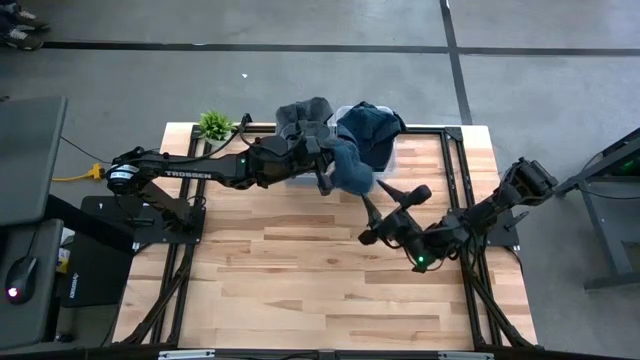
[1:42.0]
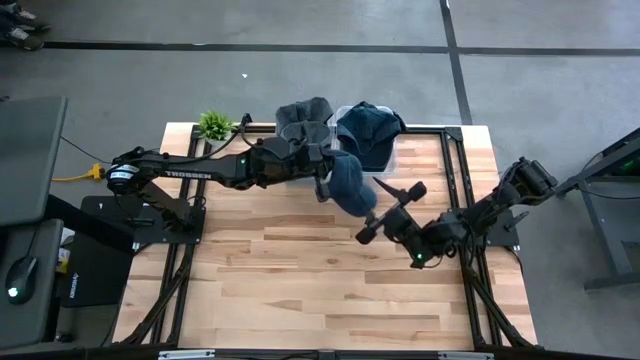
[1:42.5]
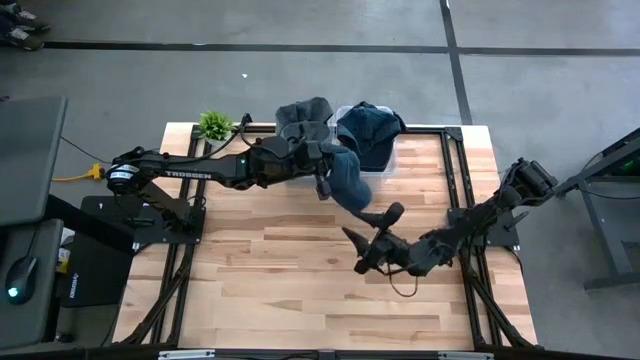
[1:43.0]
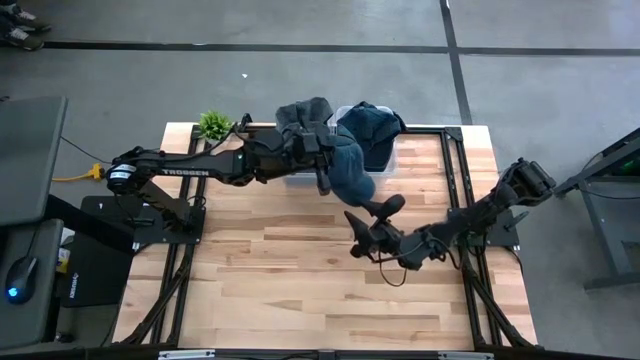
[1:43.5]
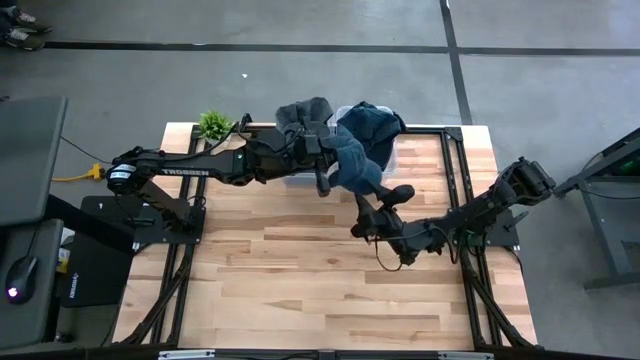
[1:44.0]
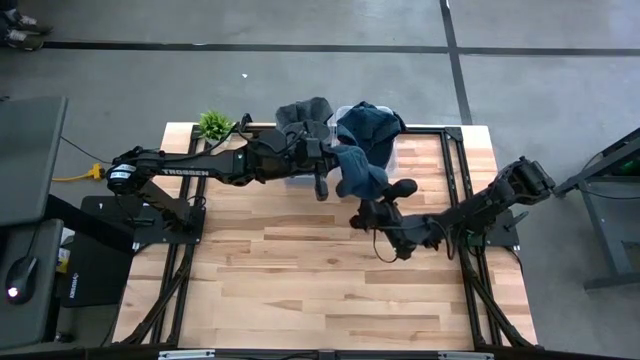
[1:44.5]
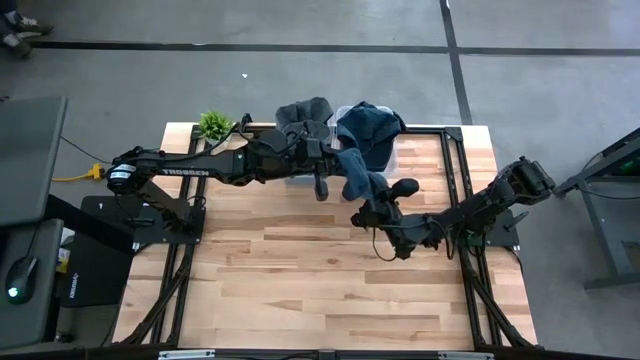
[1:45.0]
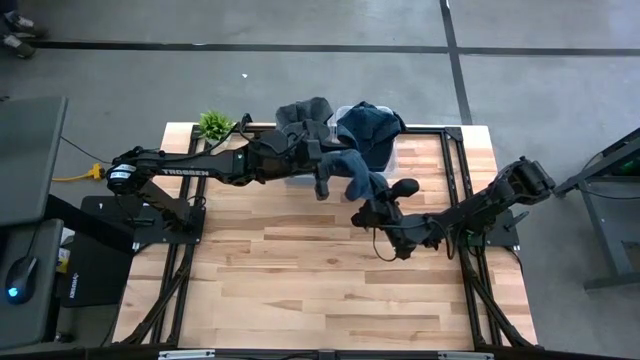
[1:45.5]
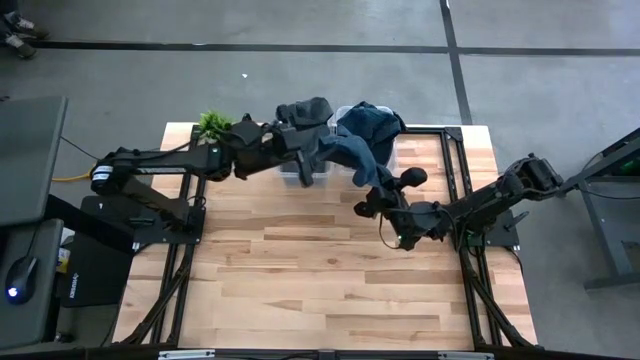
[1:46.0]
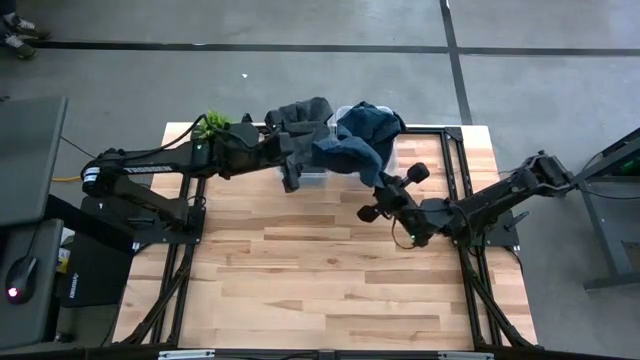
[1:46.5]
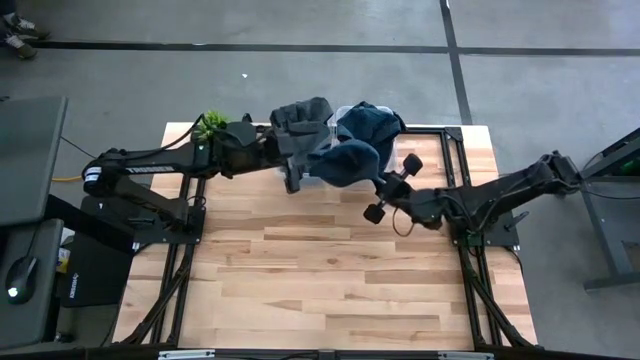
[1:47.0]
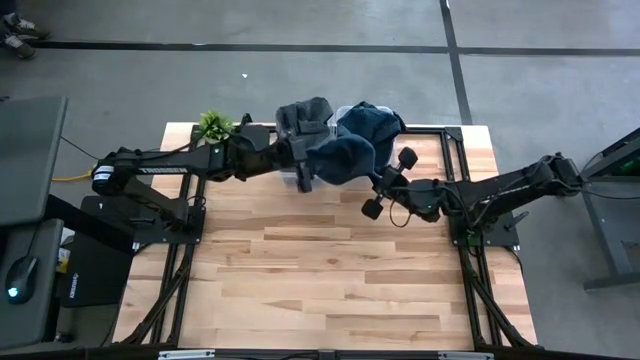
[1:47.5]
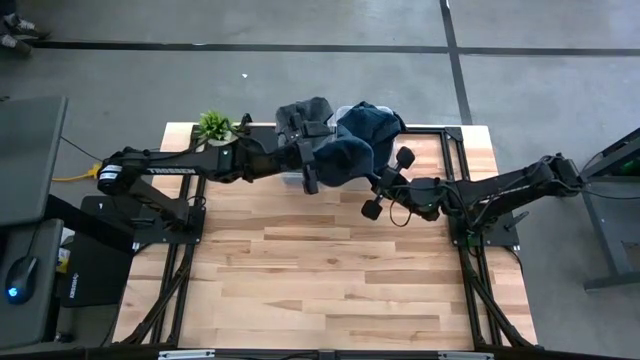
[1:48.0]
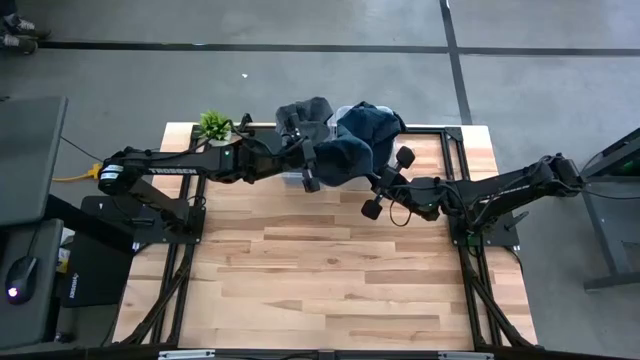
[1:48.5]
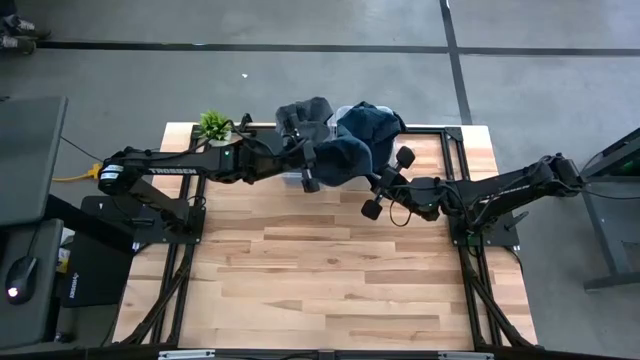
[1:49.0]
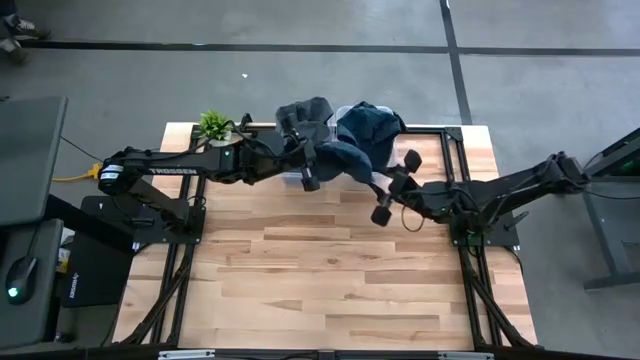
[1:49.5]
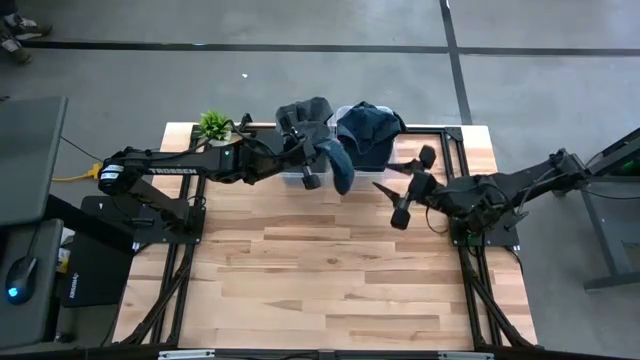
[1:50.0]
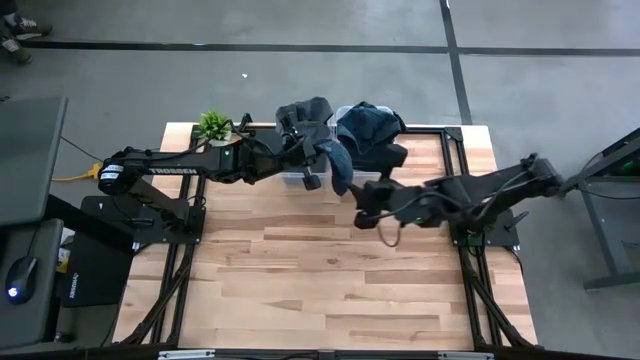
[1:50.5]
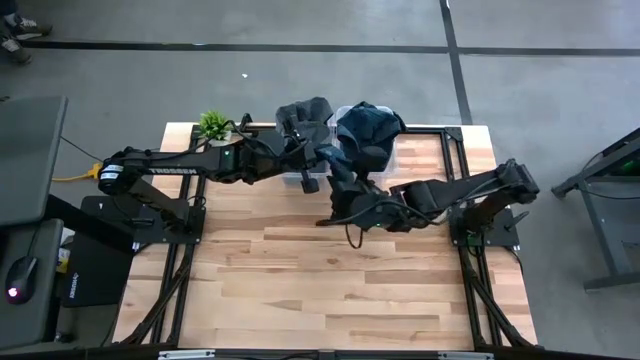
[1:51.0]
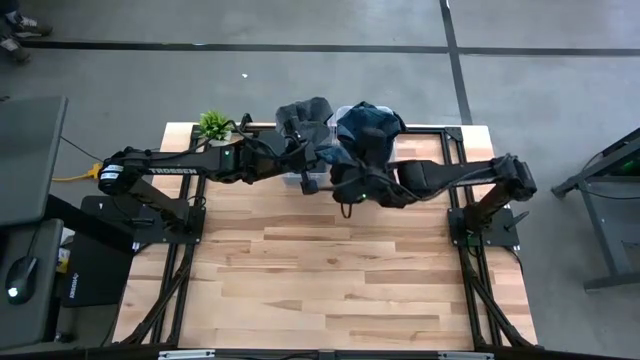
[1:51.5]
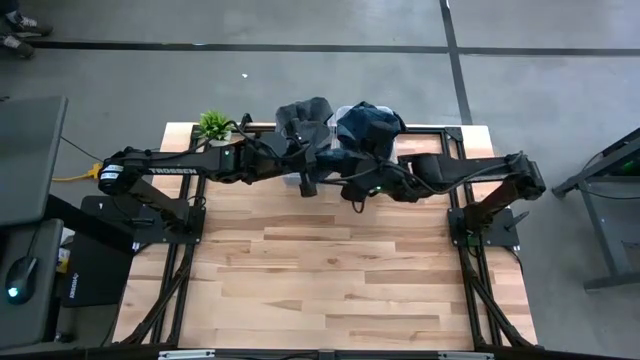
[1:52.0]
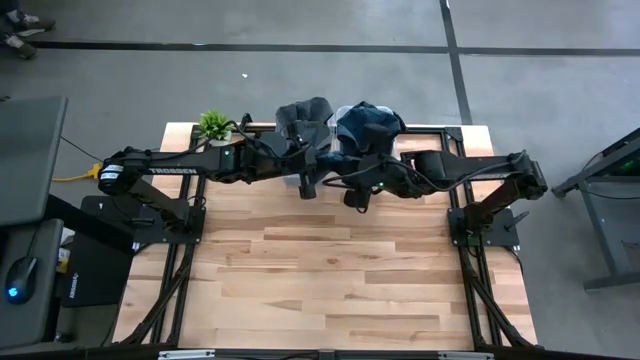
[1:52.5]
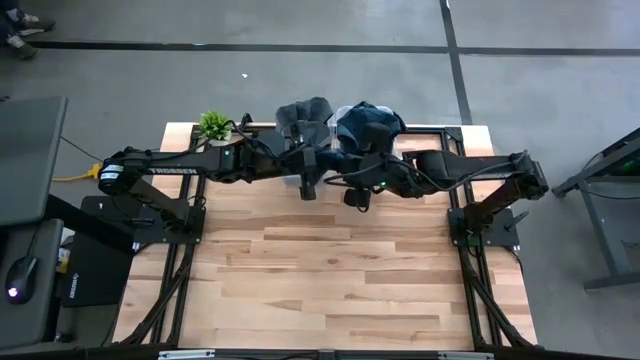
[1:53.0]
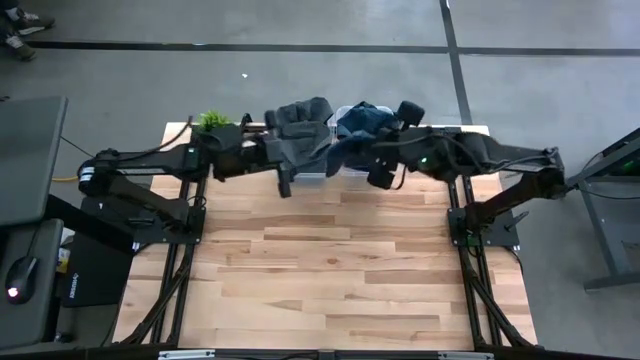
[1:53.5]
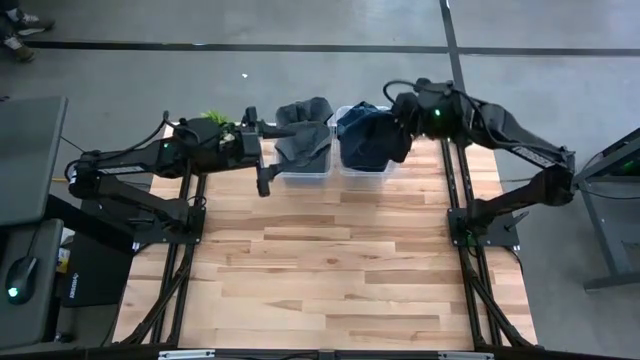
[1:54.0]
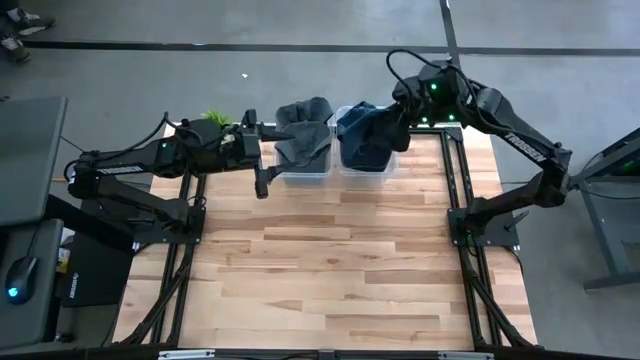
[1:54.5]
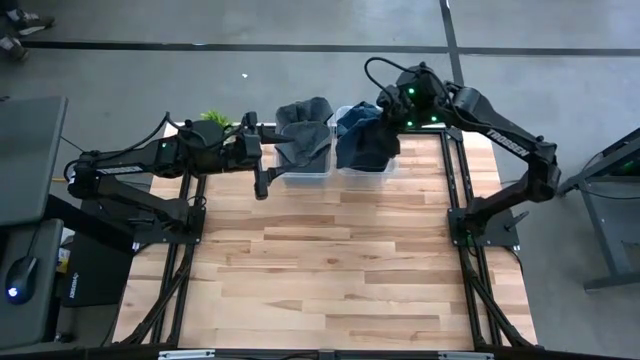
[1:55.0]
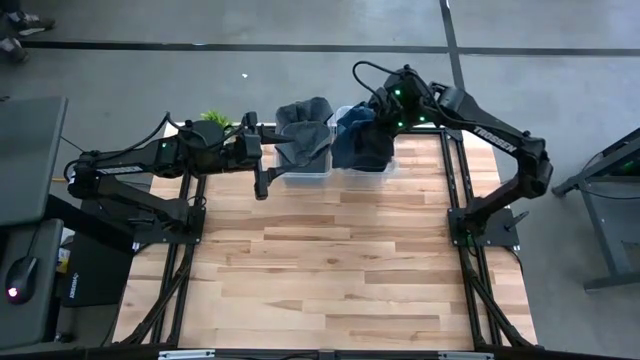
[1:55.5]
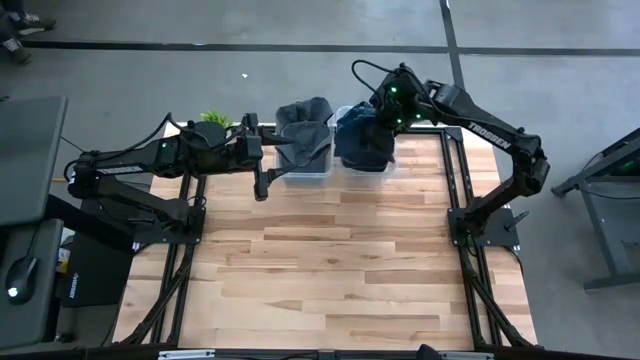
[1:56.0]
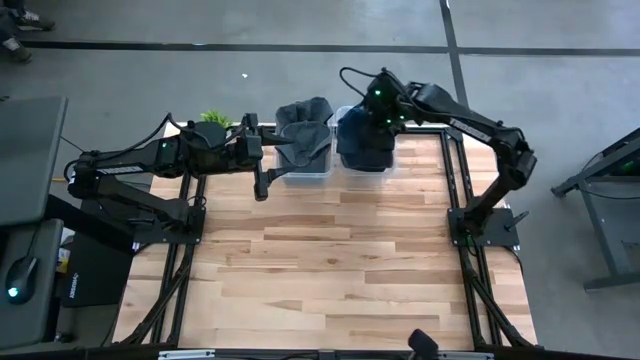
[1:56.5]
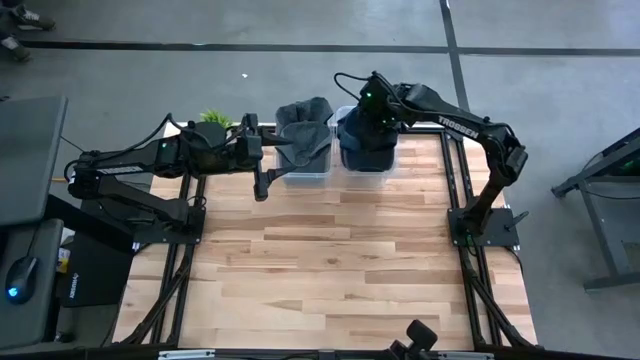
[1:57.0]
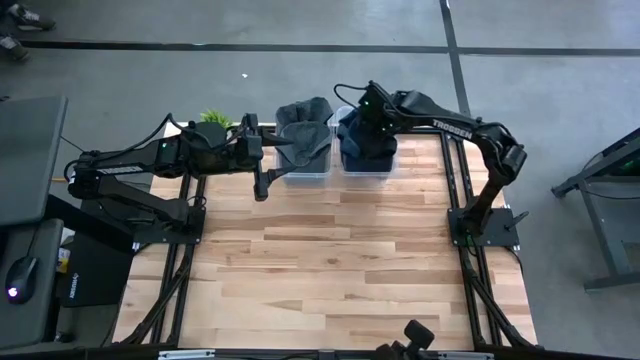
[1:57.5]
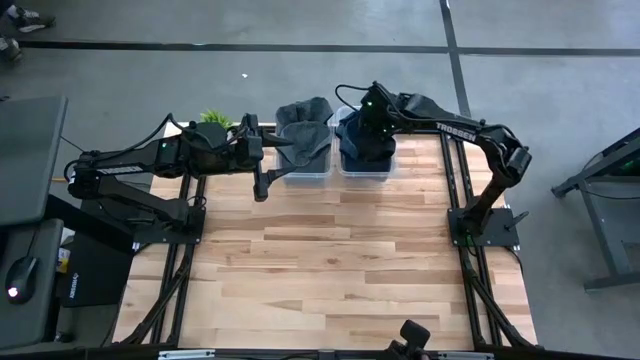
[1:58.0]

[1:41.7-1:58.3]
Task: Pick & Place hat
Put the blue cap into the right transparent bin

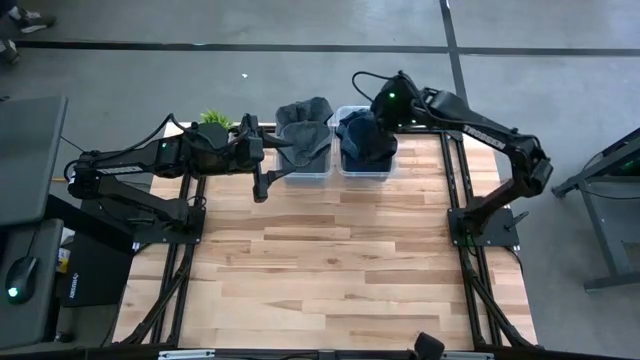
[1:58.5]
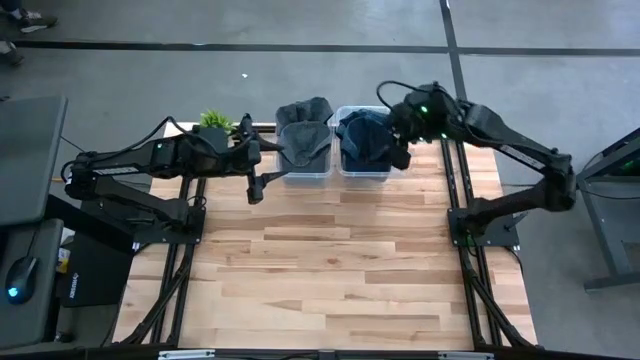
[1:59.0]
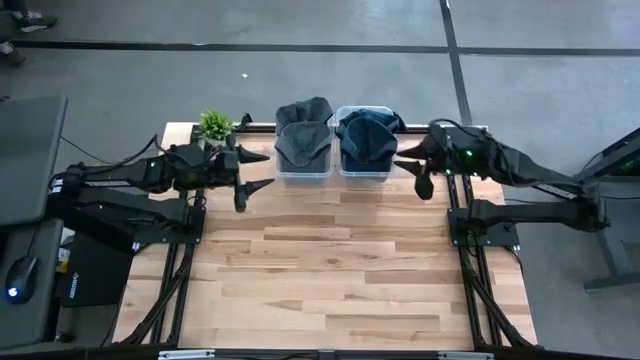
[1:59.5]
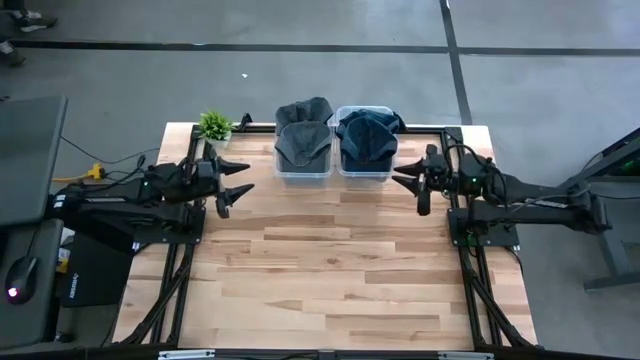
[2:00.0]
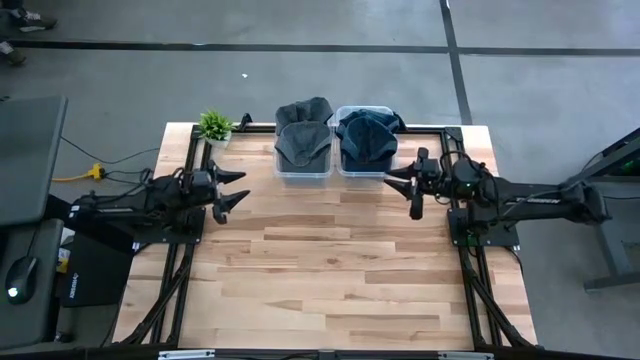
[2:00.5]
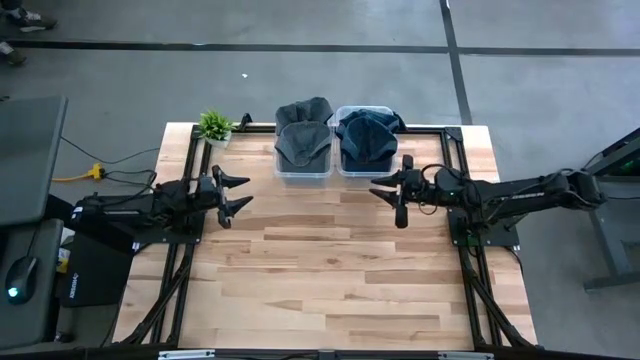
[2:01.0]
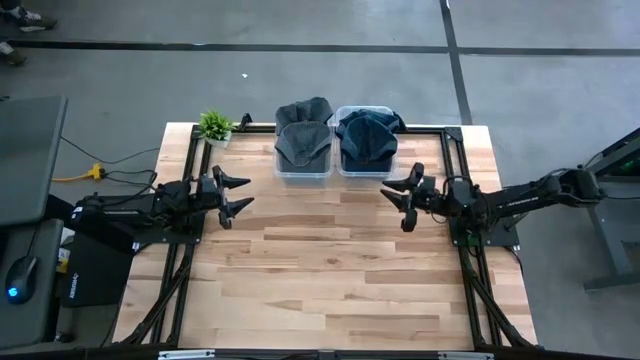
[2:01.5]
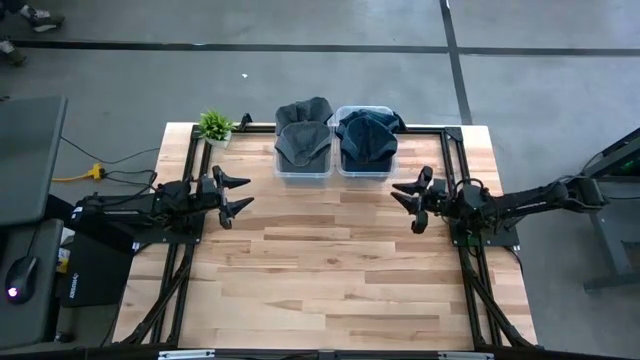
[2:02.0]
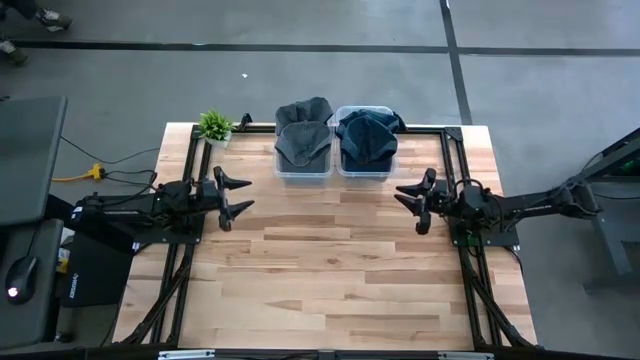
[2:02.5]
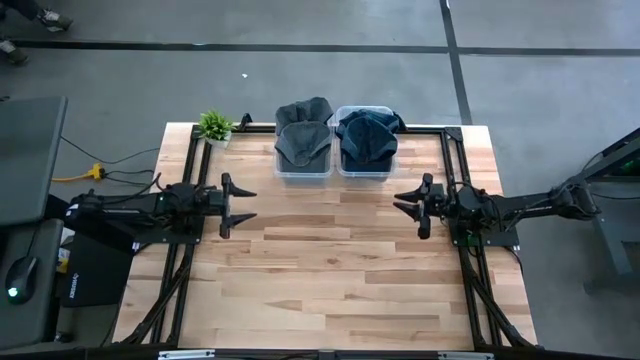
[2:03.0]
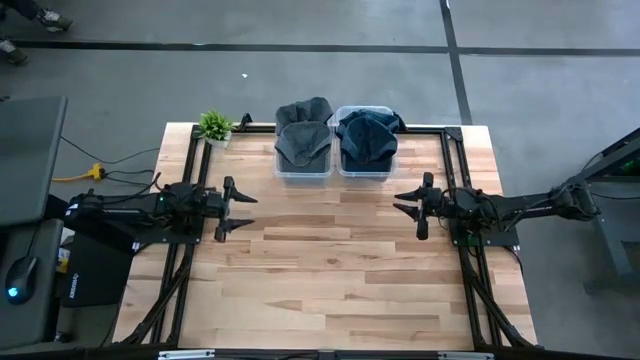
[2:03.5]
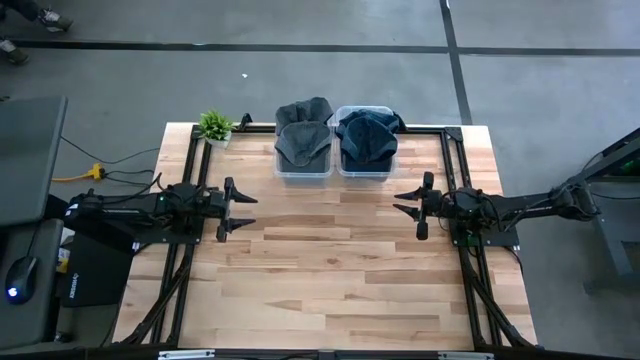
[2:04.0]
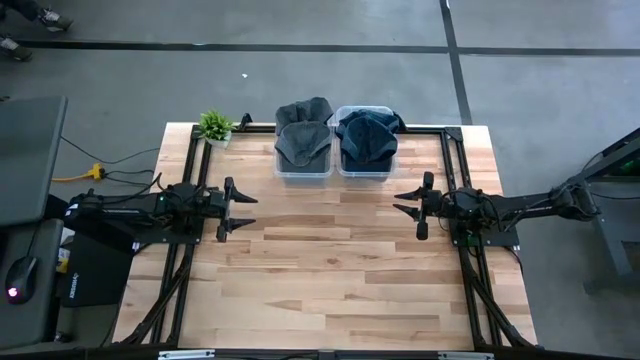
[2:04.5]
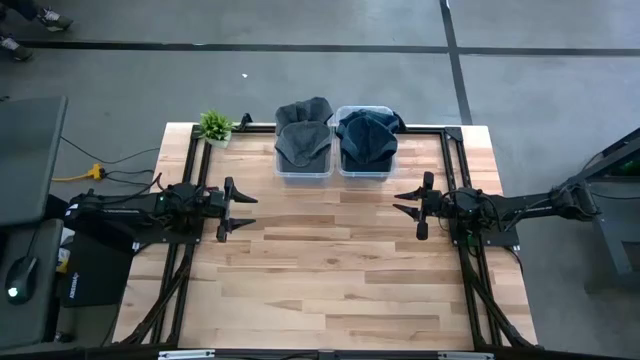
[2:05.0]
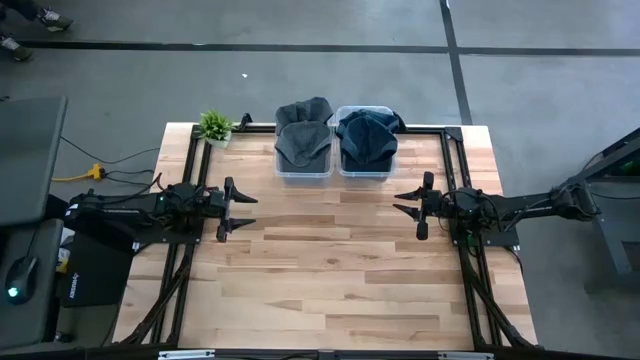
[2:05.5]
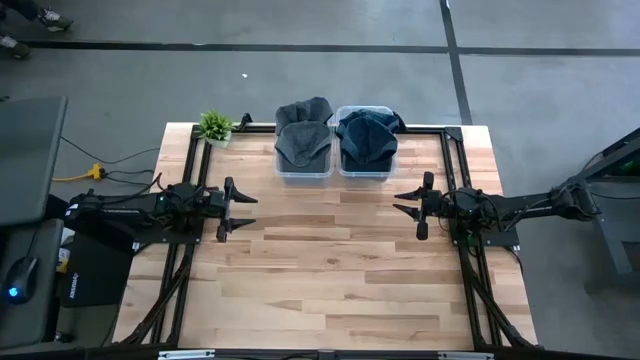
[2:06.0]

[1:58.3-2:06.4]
Return to Home Position
